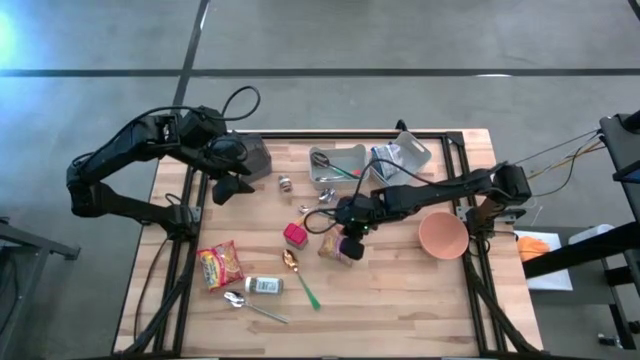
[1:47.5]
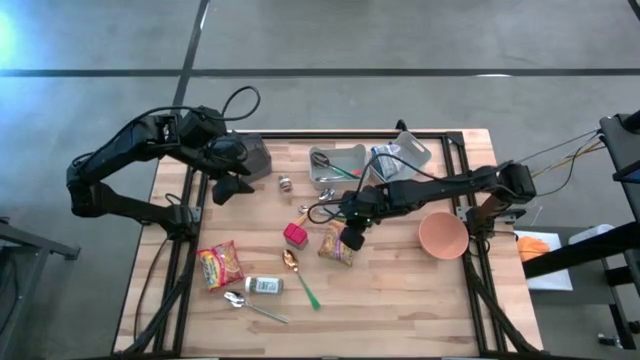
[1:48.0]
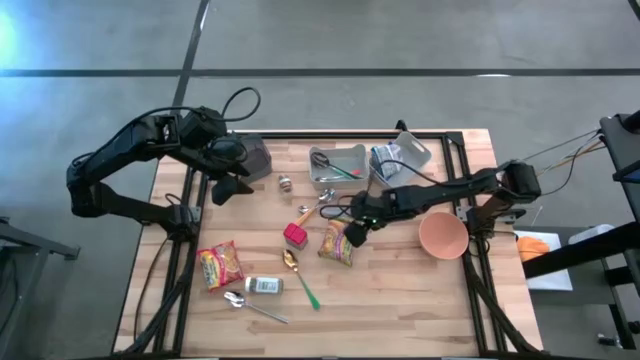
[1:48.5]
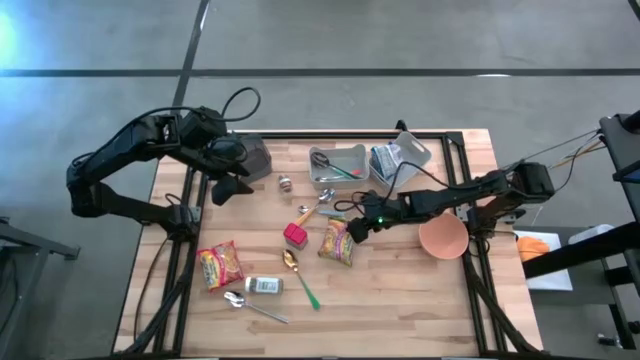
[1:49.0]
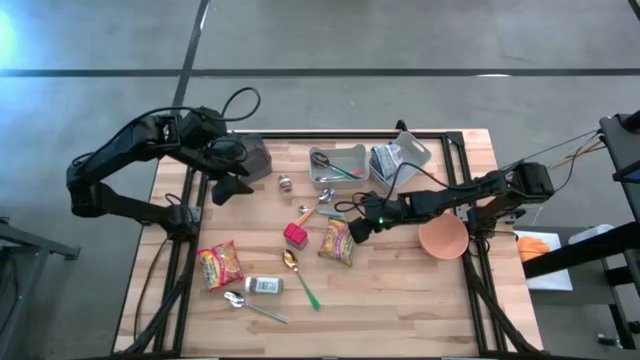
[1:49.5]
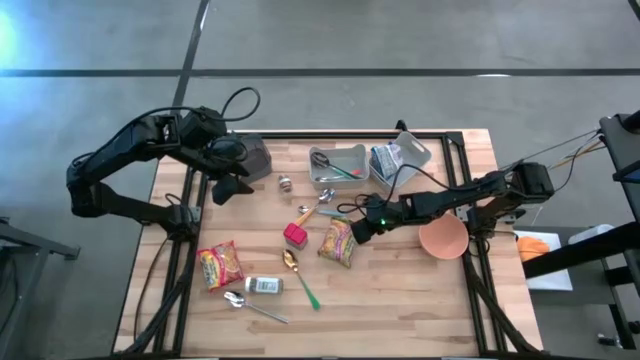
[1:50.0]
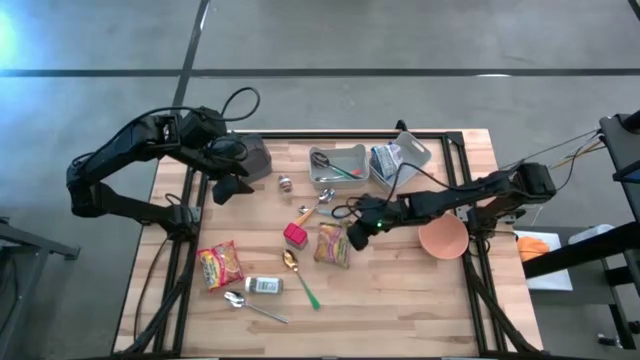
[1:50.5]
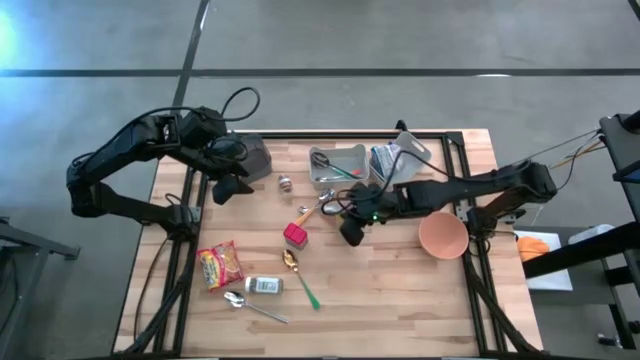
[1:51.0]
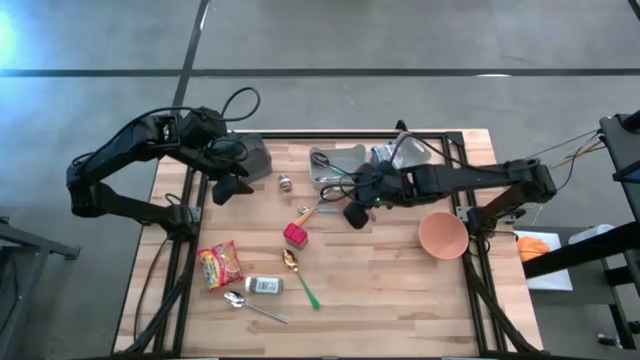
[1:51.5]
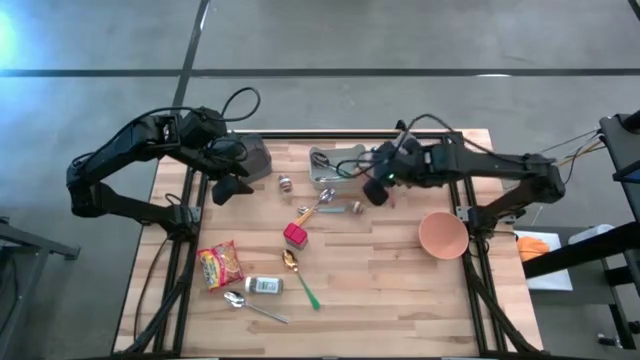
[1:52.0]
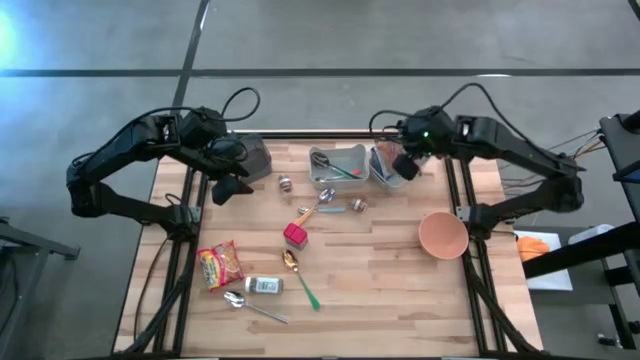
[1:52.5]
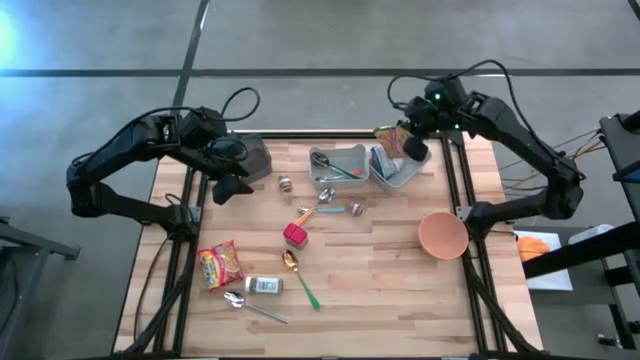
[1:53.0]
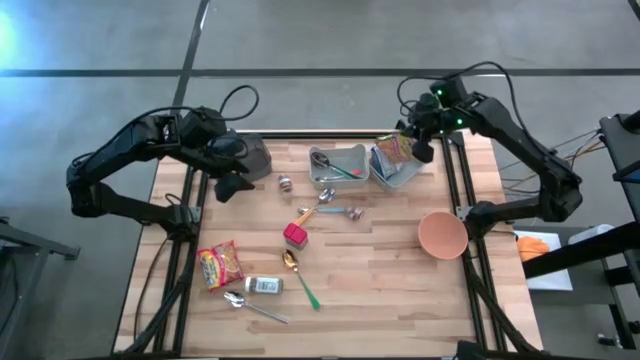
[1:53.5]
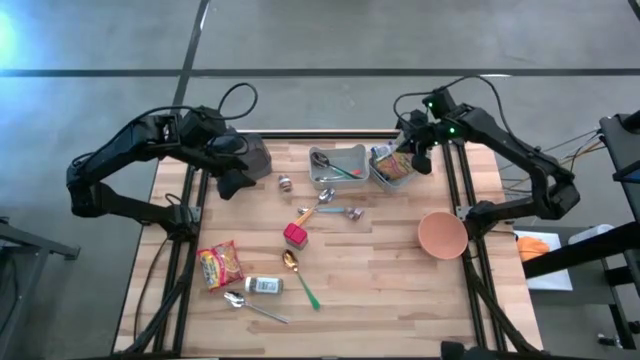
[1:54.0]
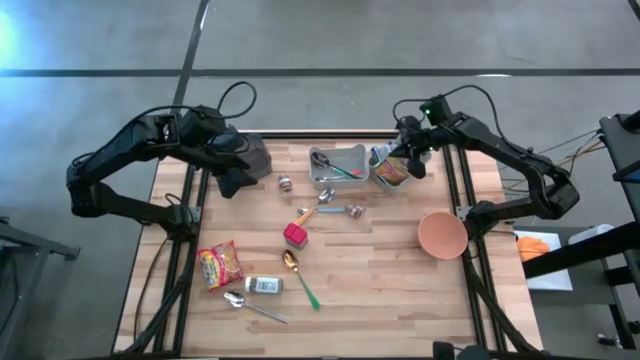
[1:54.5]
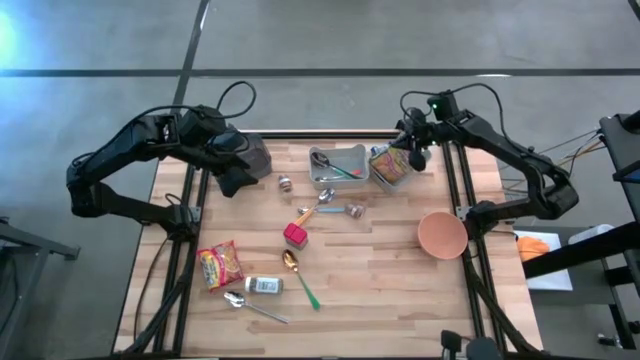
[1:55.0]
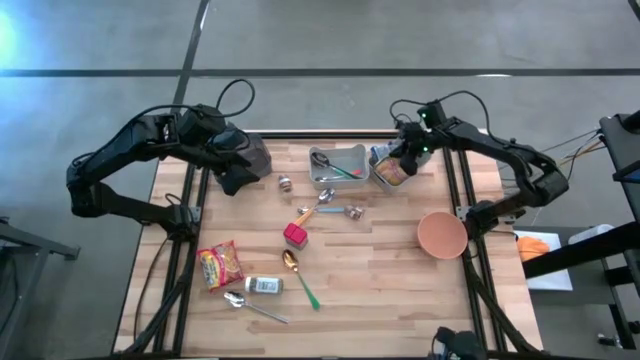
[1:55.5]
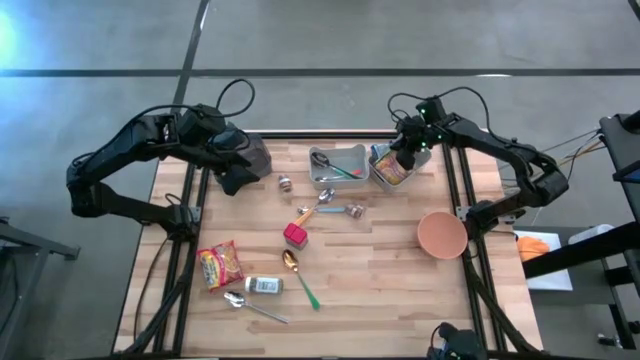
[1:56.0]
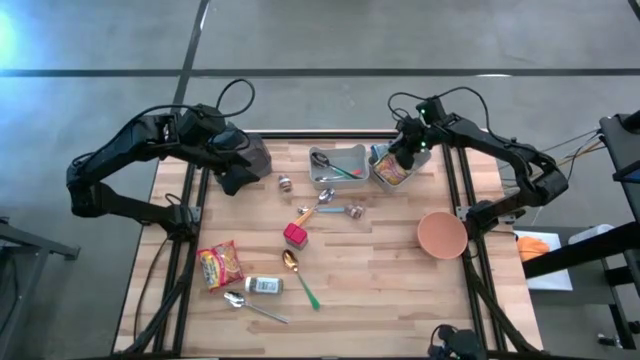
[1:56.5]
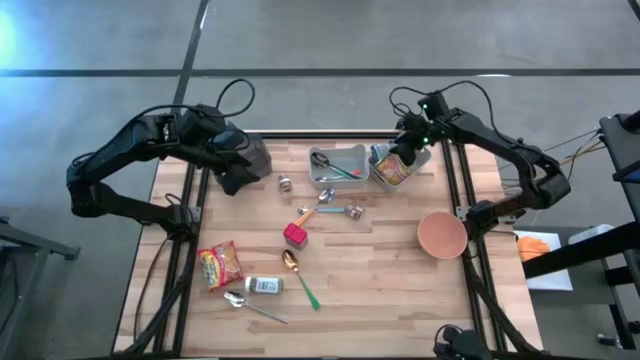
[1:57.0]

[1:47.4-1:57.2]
Put the blue noodle pack into the right gray bin
